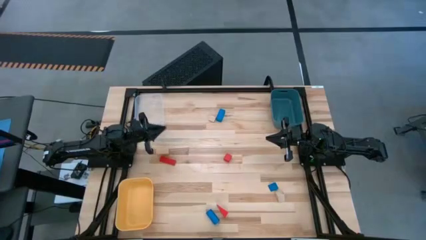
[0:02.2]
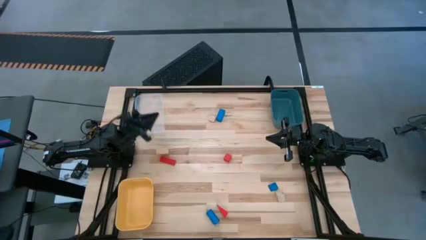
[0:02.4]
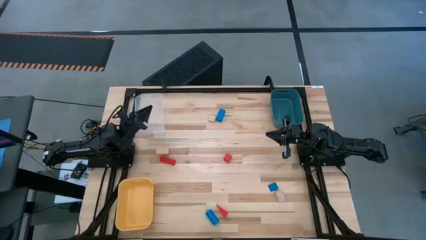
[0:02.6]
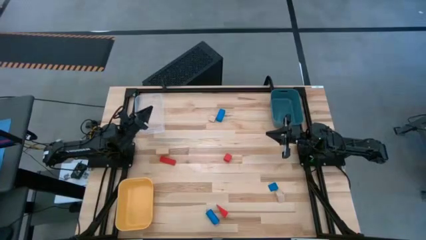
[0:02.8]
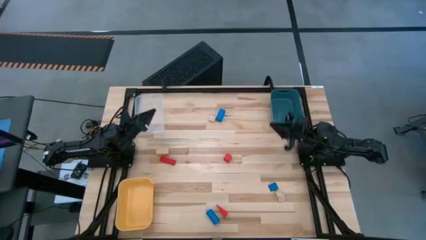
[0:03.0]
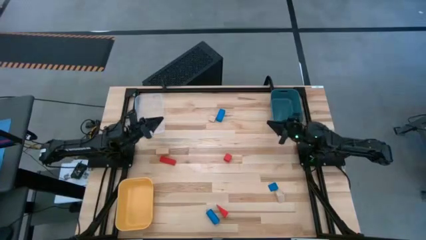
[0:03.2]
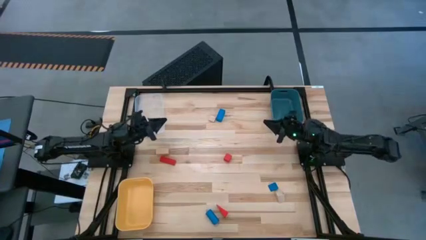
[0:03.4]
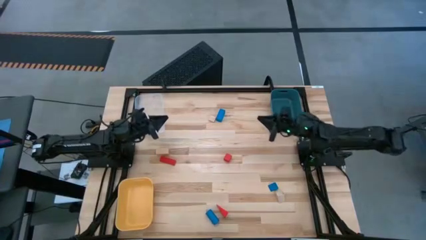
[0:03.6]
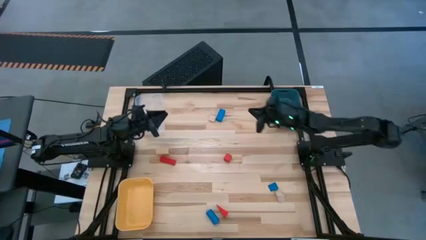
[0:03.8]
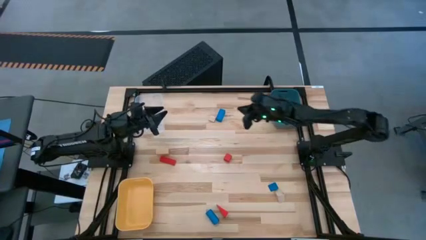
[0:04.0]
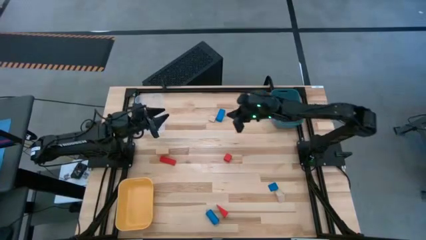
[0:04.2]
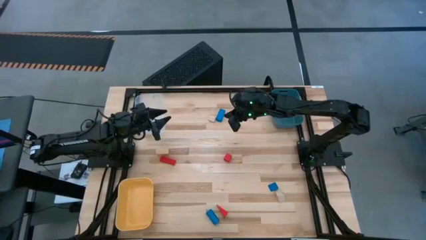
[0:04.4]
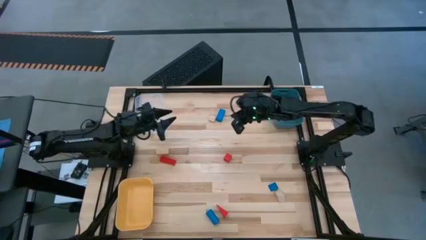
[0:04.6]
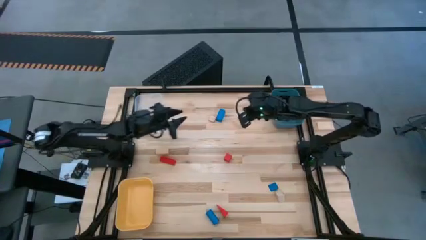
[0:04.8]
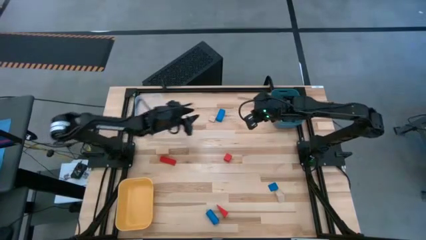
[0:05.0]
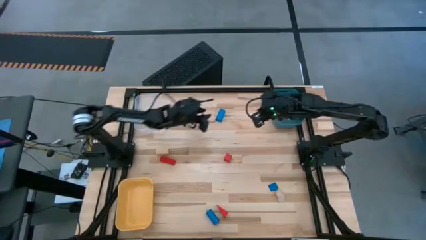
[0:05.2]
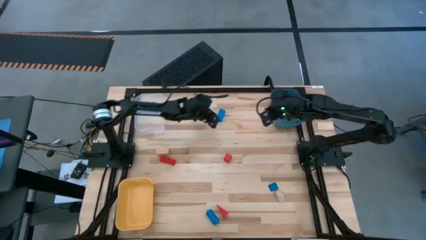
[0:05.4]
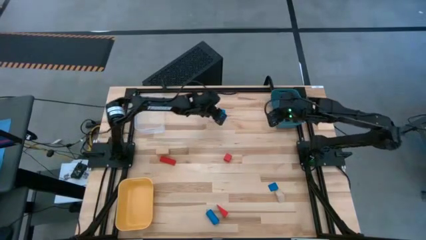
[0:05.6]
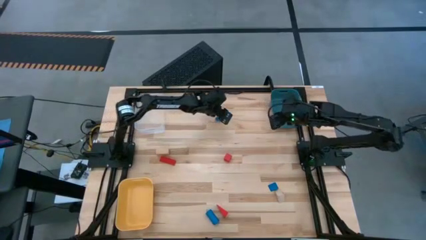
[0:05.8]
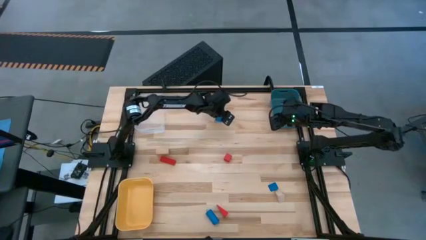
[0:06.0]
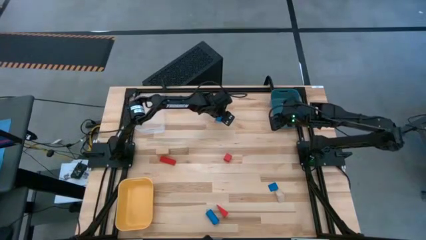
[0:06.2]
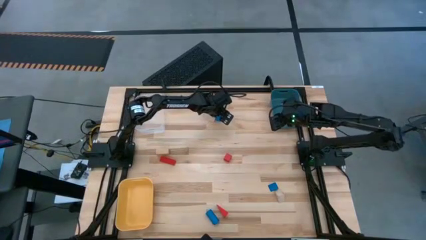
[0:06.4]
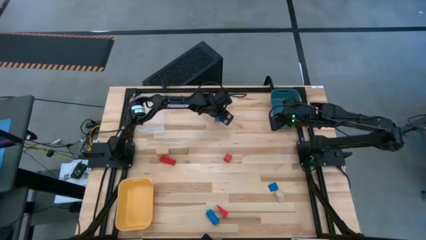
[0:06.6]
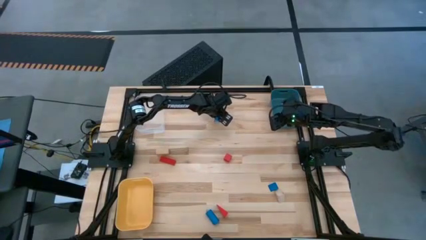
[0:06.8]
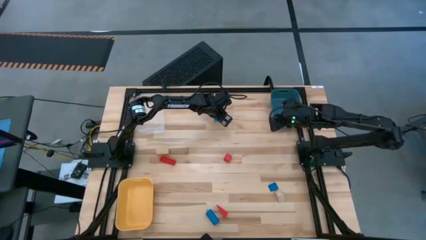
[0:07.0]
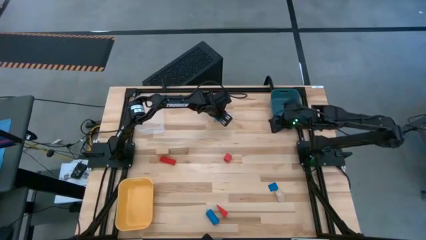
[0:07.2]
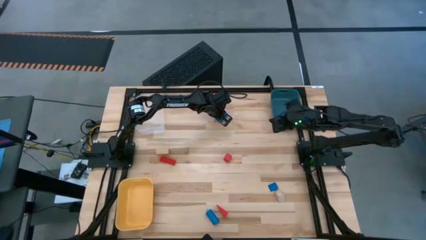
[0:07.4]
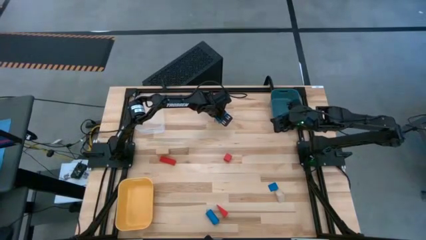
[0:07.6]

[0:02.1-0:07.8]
Task: Sort & place blocks by color
Put the top blue block into the yellow bin

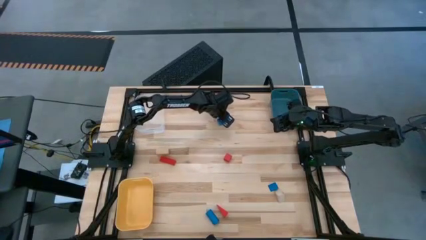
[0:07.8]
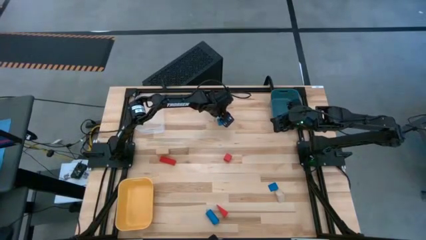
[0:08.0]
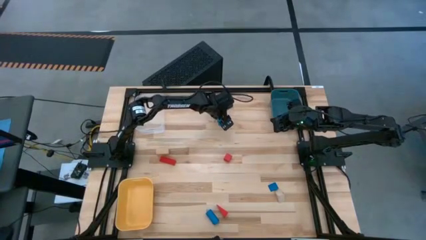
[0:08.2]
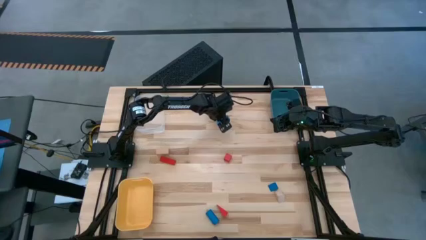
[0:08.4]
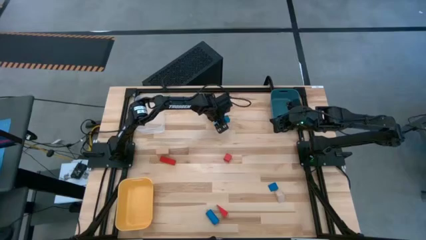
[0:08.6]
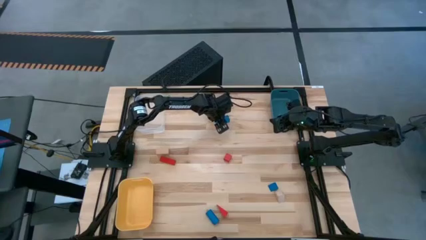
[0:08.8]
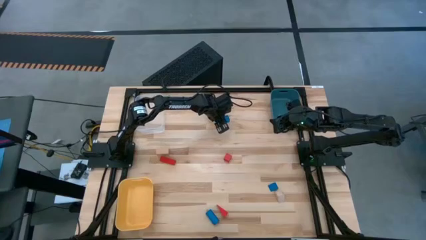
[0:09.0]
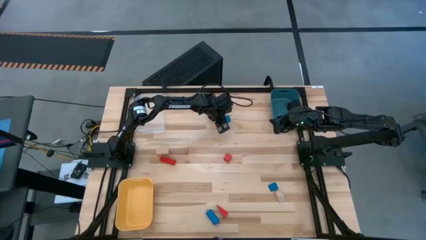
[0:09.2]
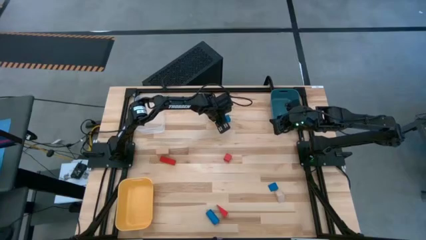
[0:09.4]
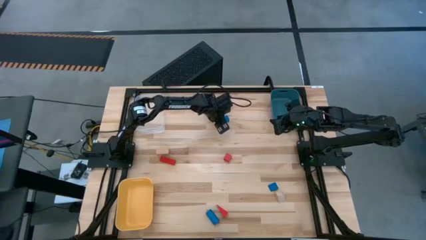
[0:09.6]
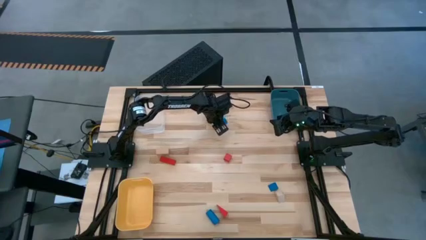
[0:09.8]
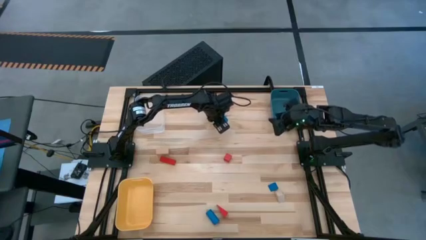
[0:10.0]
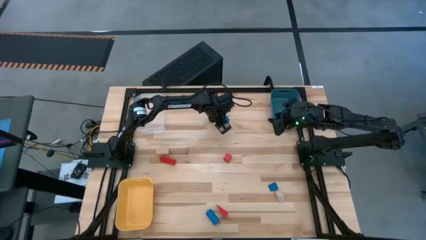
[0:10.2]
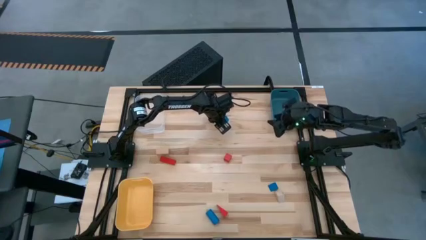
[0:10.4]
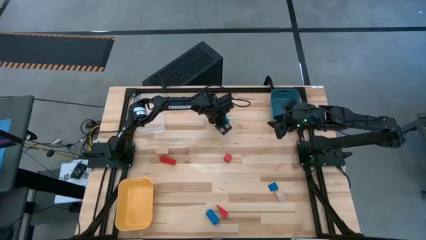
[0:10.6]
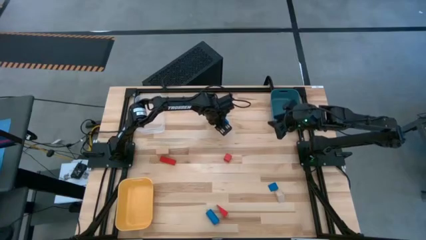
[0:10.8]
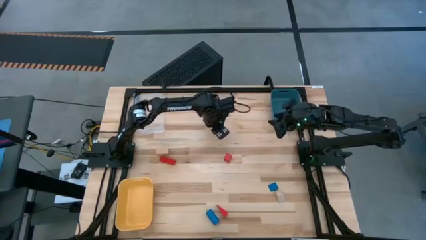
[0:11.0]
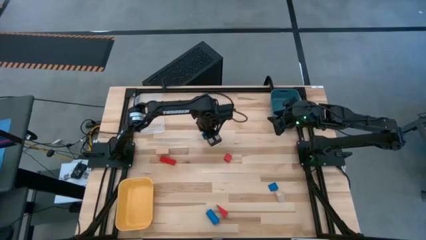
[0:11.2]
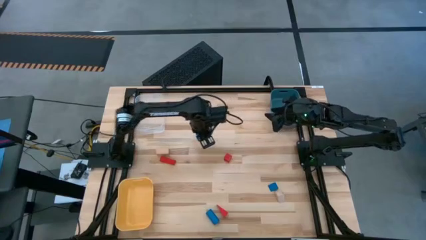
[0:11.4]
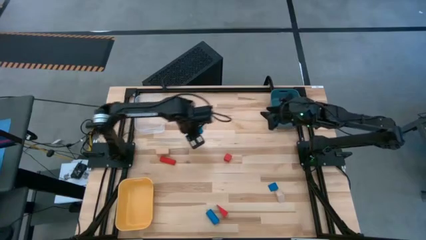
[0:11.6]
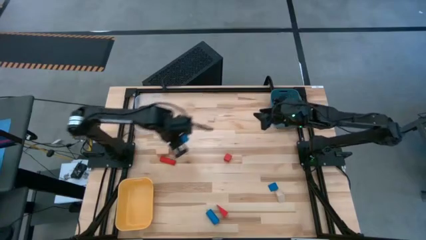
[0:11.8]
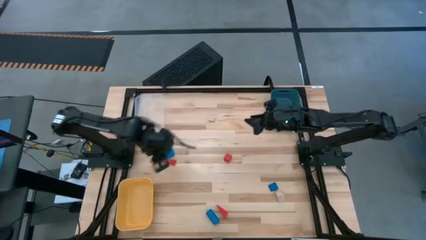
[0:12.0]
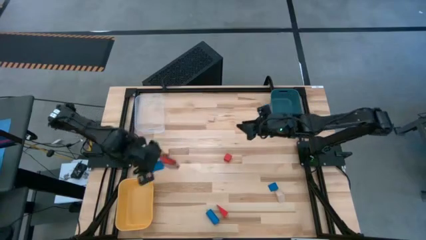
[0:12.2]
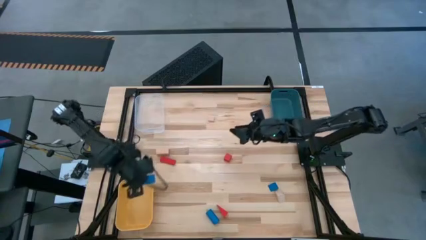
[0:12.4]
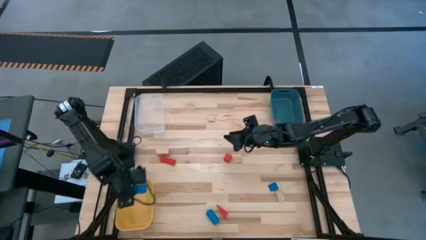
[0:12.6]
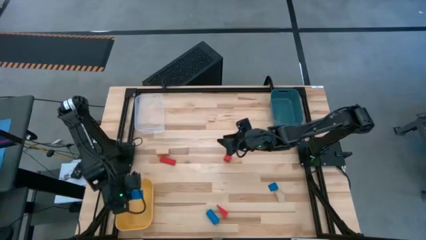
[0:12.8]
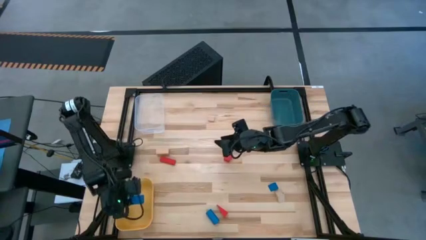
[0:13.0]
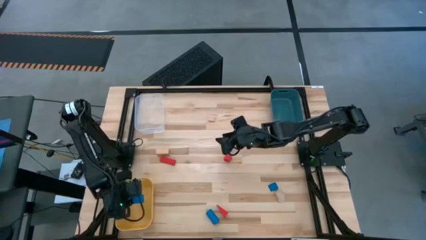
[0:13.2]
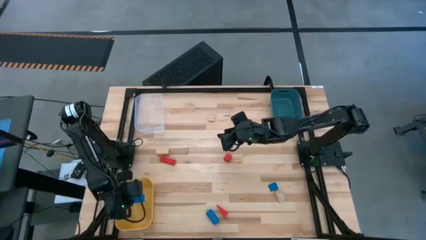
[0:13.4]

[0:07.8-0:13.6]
Put the top blue block into the yellow bin

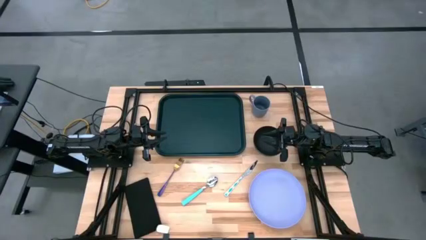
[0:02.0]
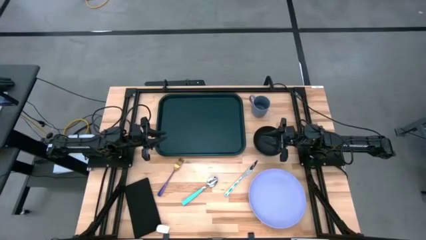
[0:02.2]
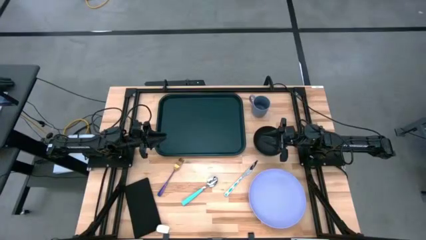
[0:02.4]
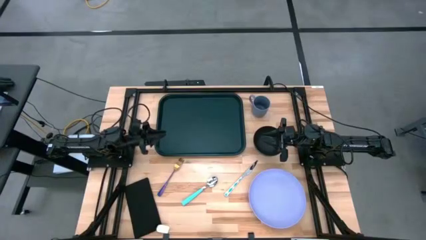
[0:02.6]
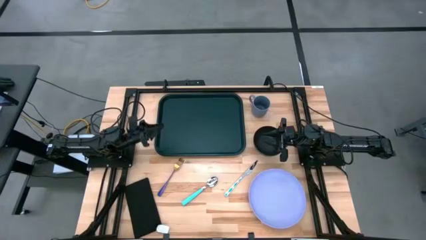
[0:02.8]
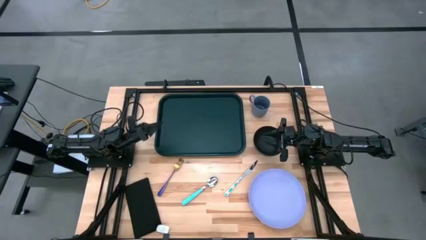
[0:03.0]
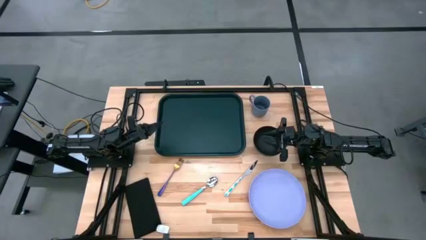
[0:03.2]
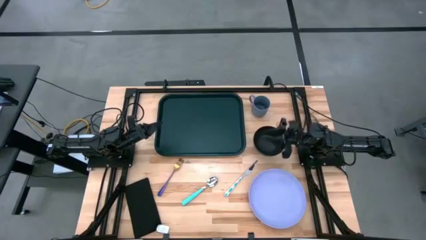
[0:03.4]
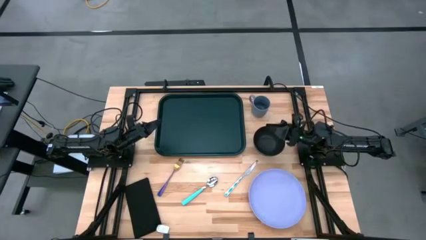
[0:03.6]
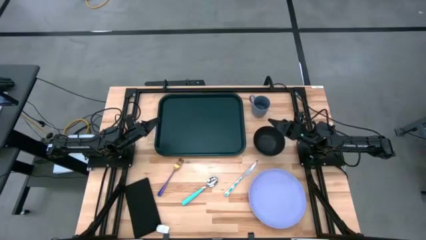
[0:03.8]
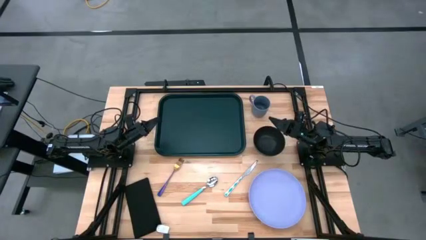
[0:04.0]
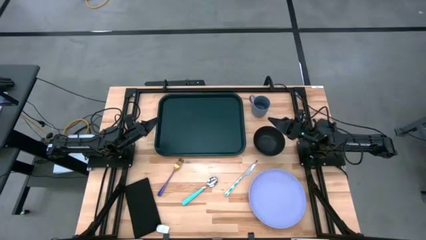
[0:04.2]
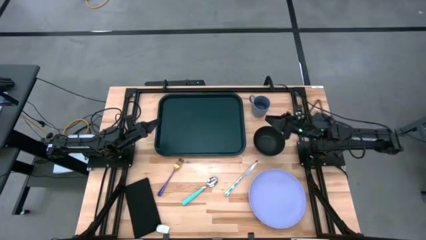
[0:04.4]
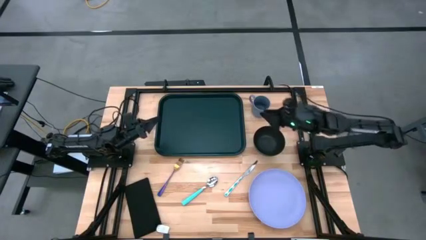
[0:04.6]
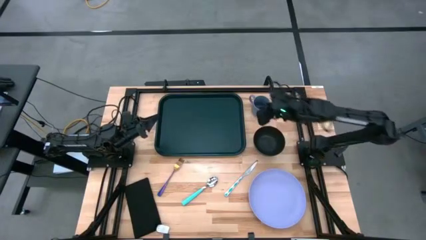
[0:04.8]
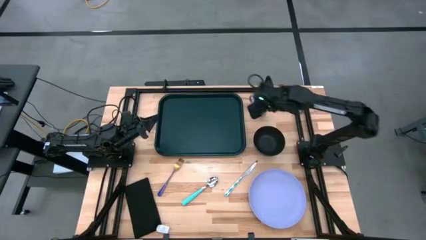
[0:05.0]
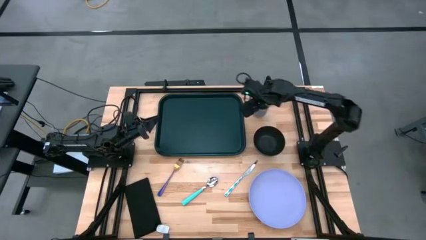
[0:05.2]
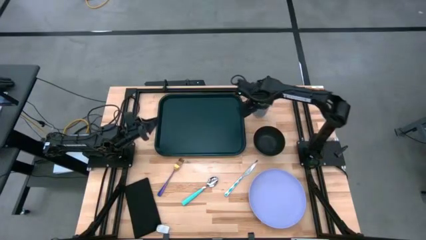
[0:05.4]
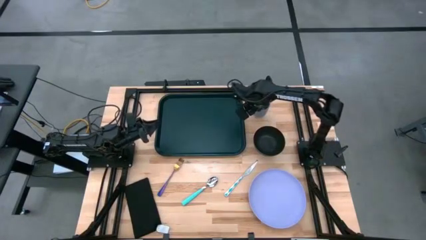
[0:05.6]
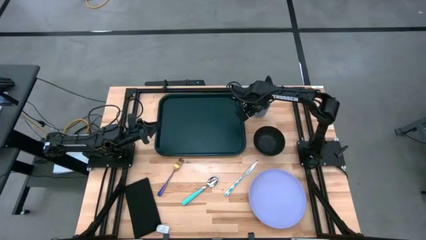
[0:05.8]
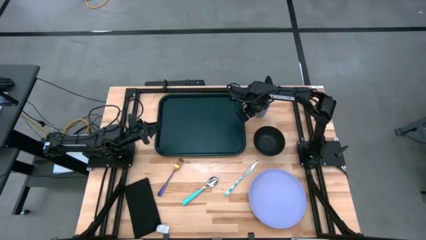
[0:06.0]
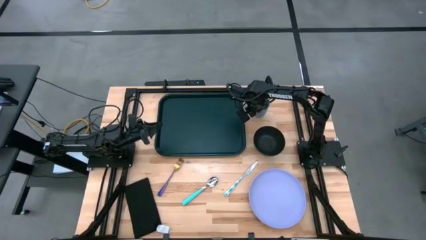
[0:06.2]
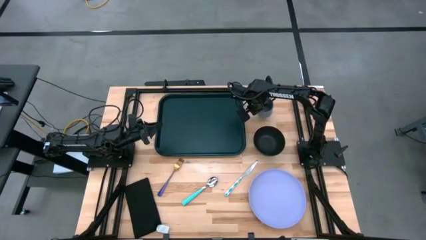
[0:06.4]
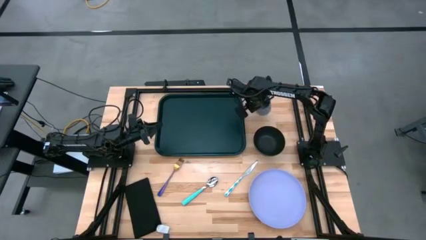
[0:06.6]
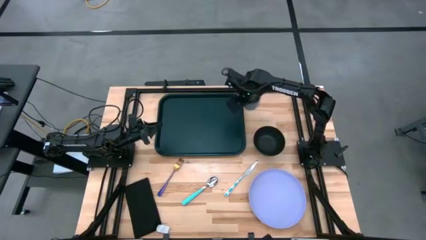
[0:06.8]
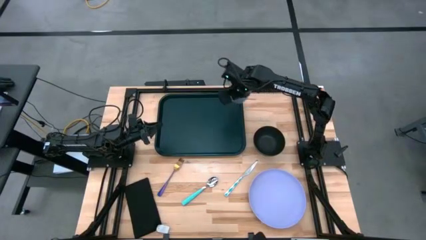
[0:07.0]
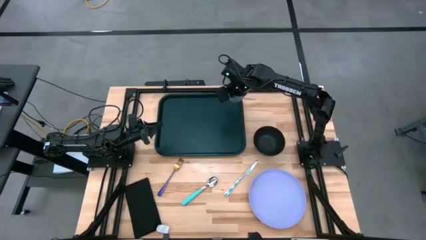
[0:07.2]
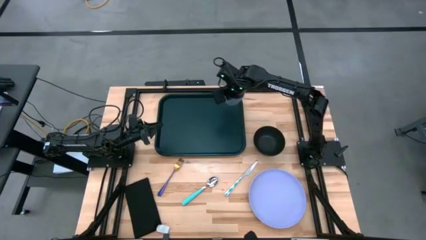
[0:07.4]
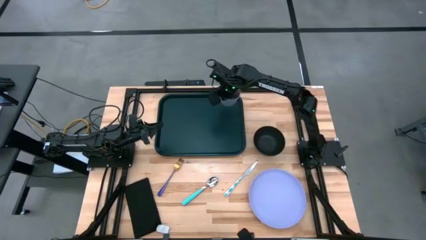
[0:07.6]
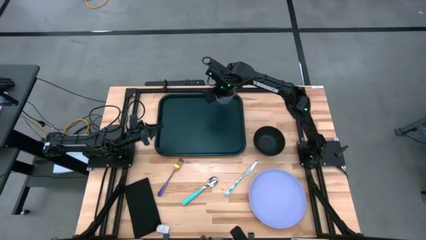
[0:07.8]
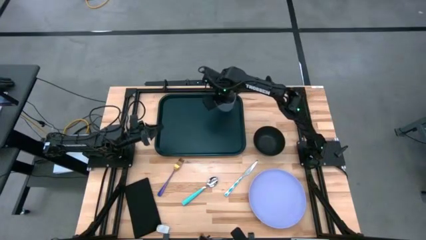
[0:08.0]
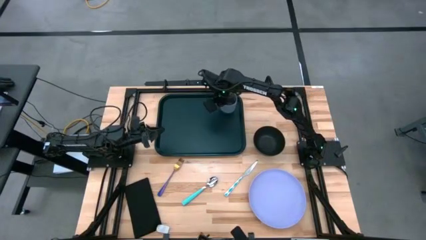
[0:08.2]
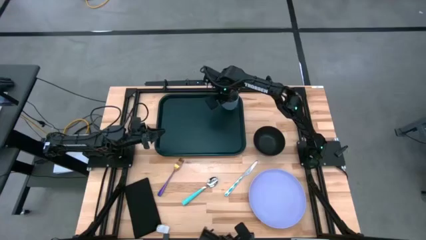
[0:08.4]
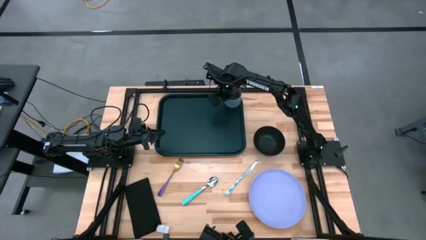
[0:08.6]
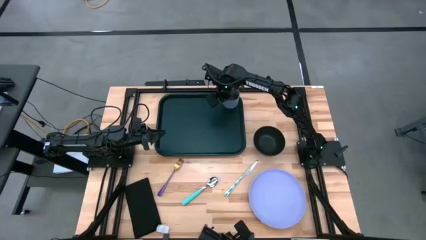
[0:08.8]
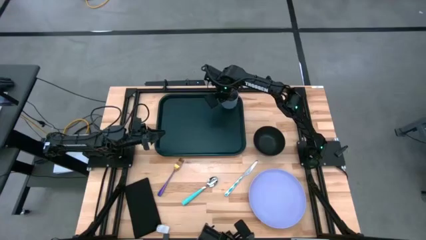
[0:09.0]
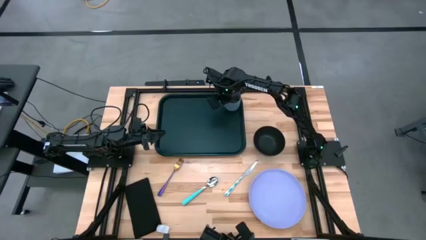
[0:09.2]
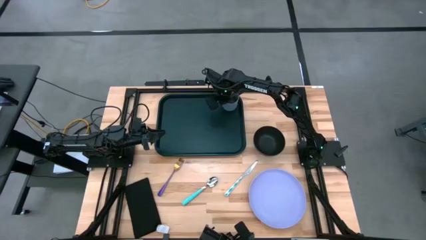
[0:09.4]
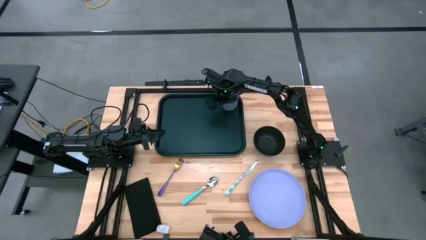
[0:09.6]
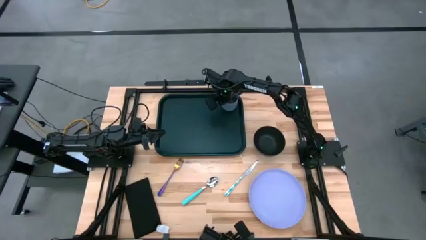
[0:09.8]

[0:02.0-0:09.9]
Task: Set up tray
Put the mug on the serving tray
